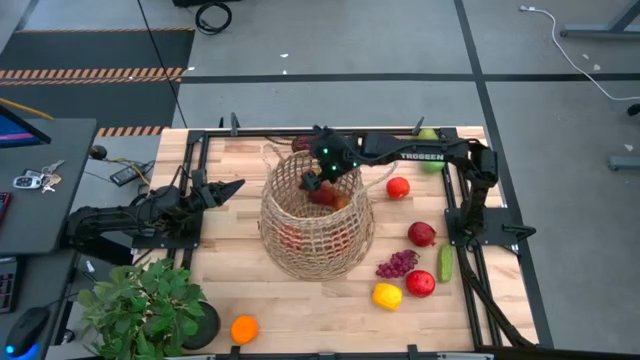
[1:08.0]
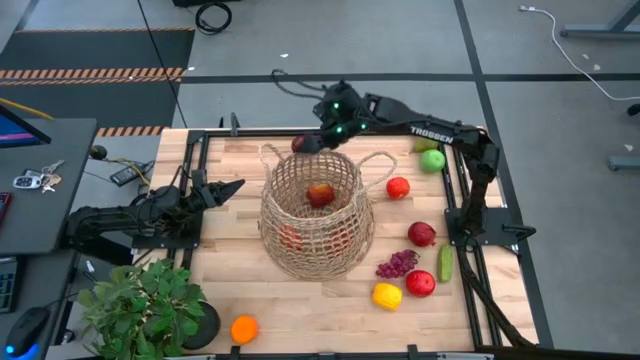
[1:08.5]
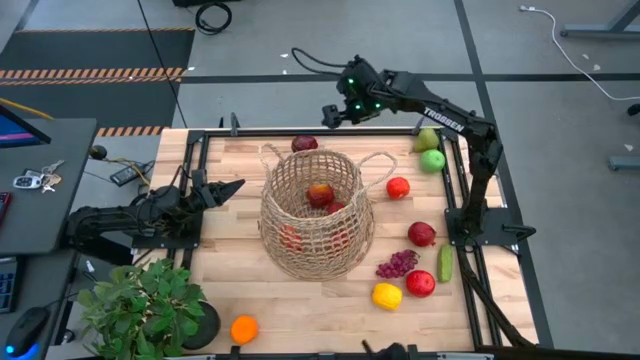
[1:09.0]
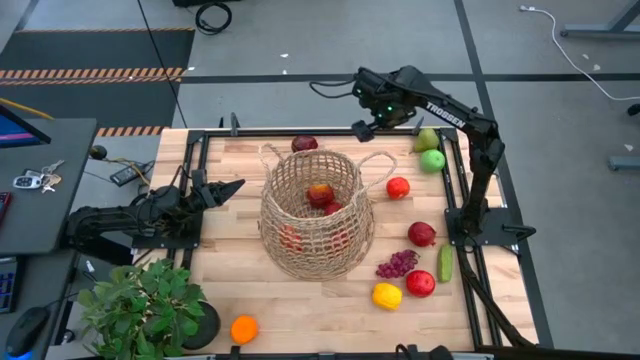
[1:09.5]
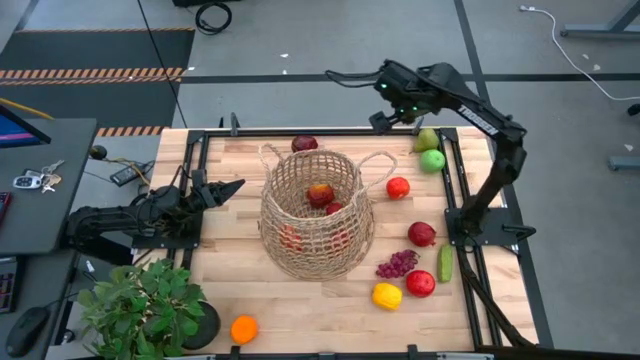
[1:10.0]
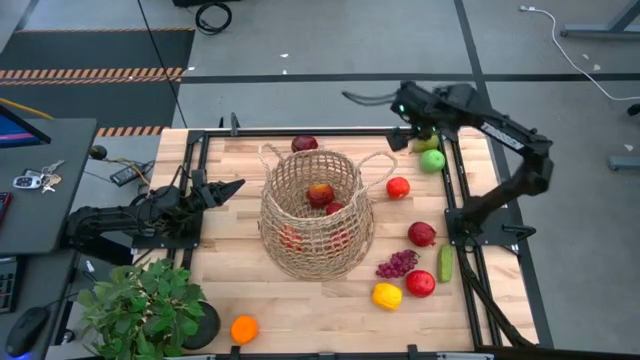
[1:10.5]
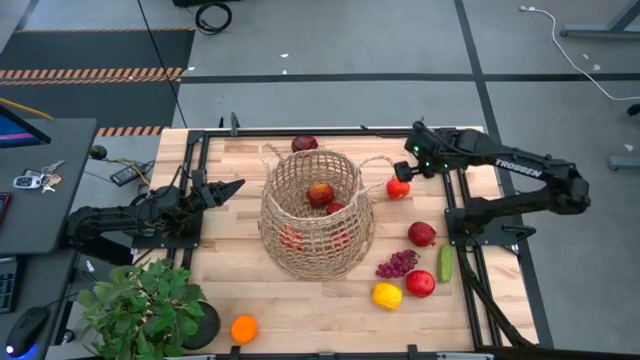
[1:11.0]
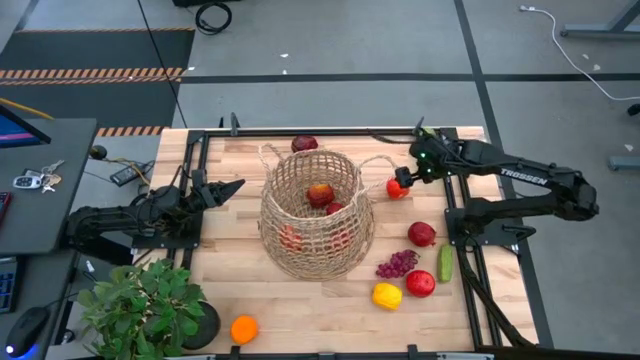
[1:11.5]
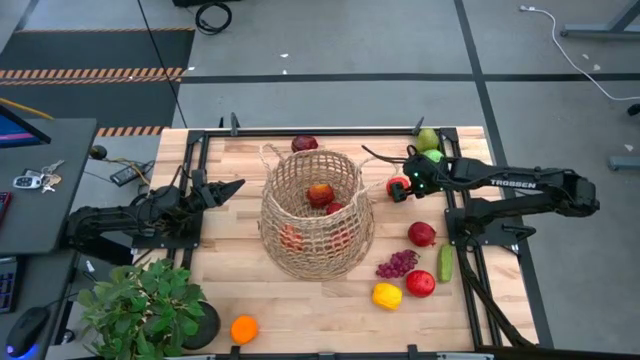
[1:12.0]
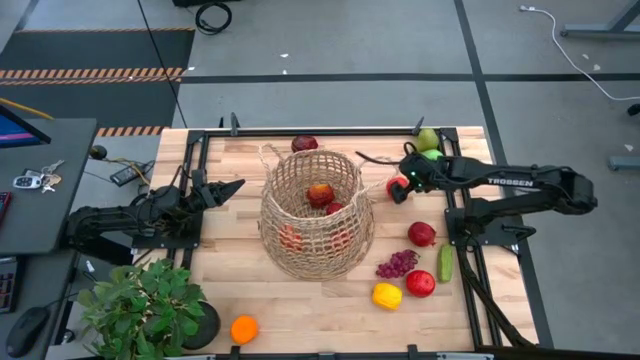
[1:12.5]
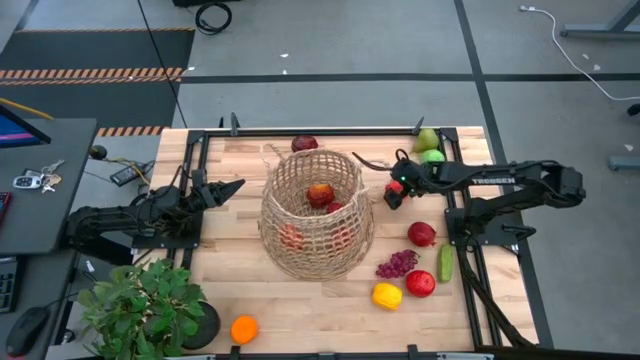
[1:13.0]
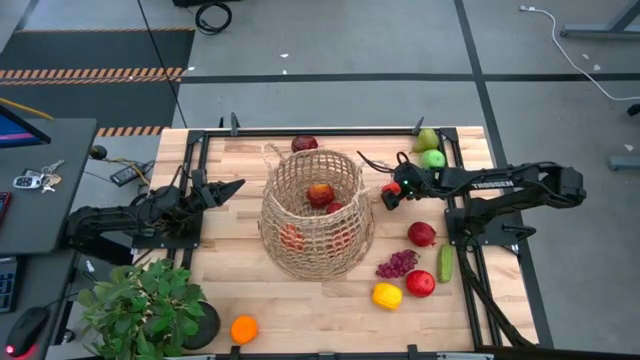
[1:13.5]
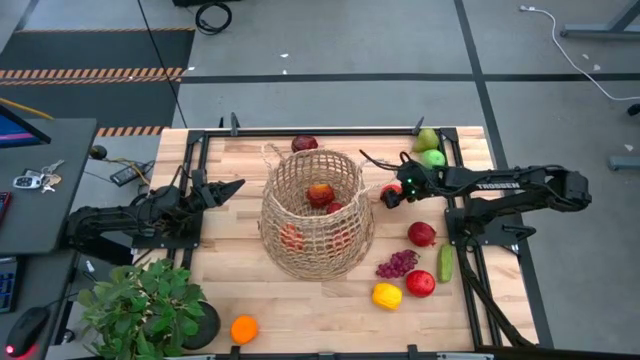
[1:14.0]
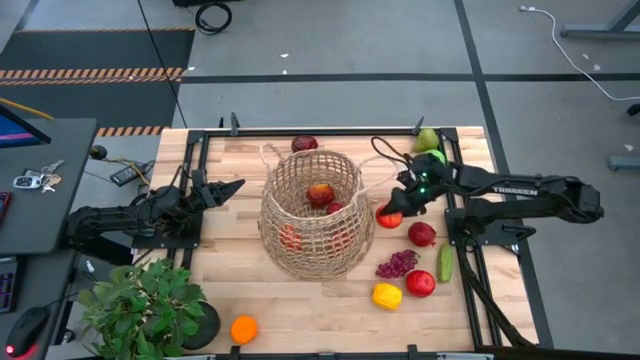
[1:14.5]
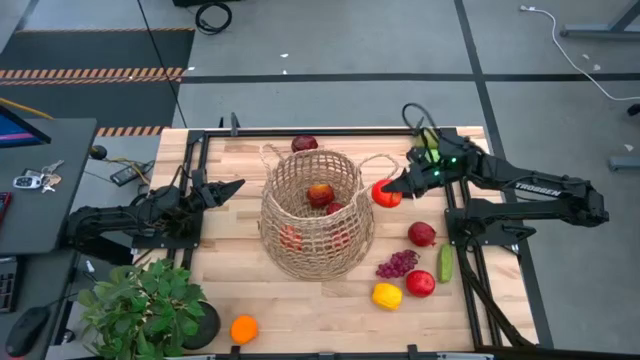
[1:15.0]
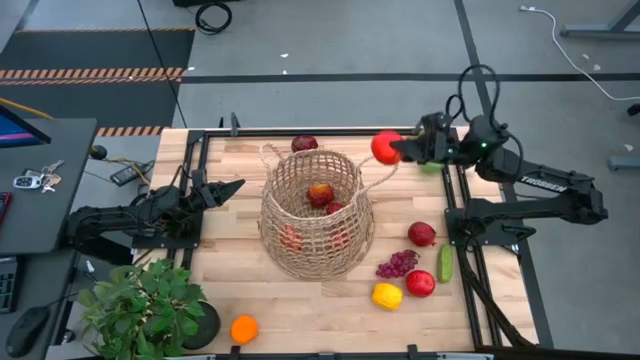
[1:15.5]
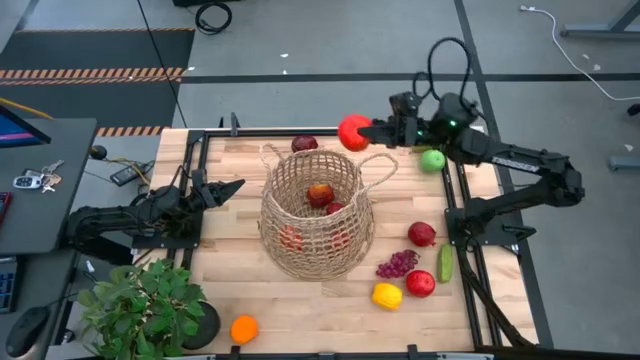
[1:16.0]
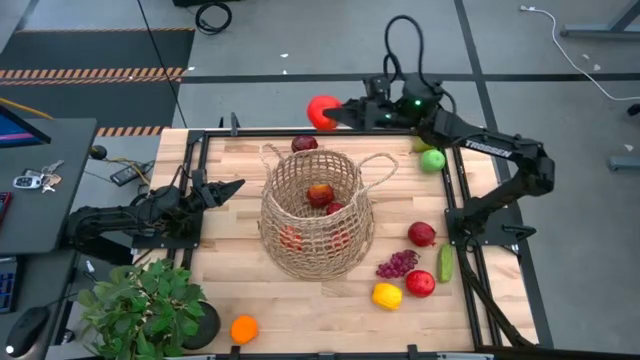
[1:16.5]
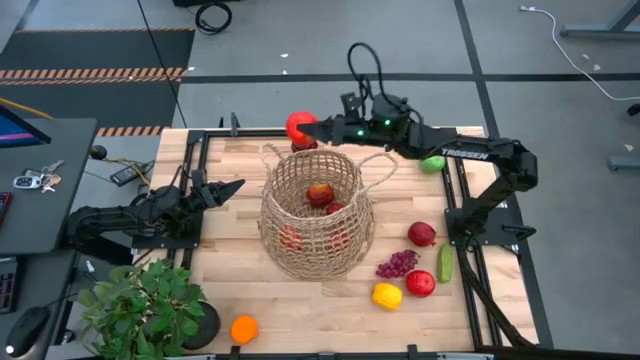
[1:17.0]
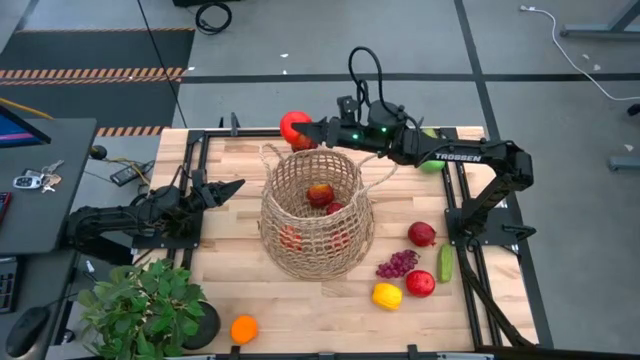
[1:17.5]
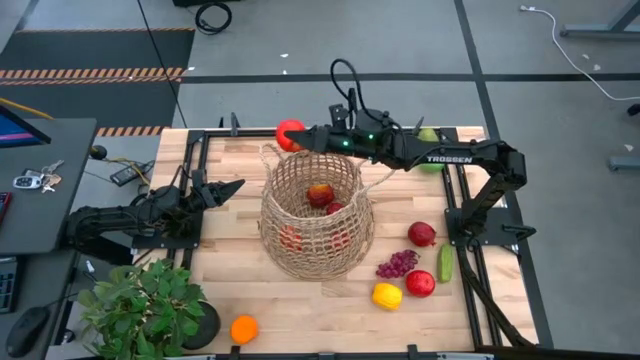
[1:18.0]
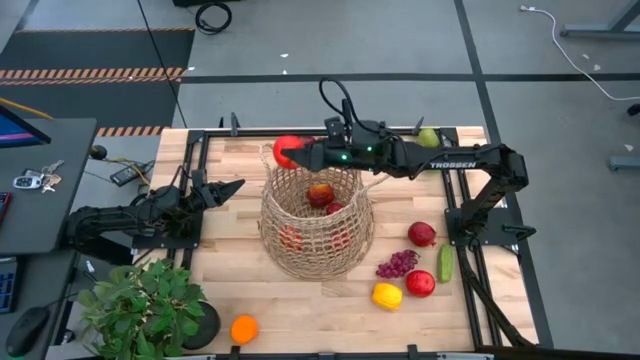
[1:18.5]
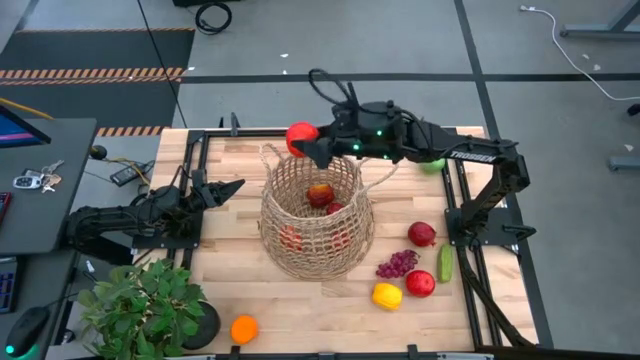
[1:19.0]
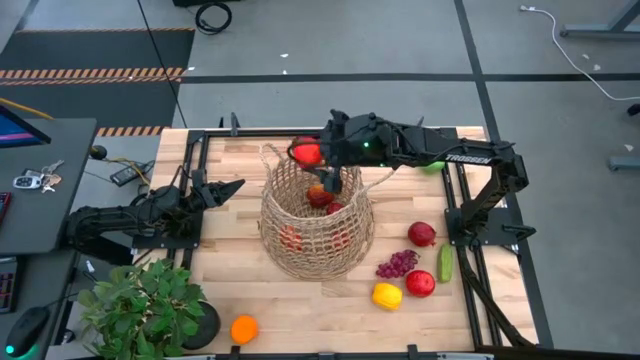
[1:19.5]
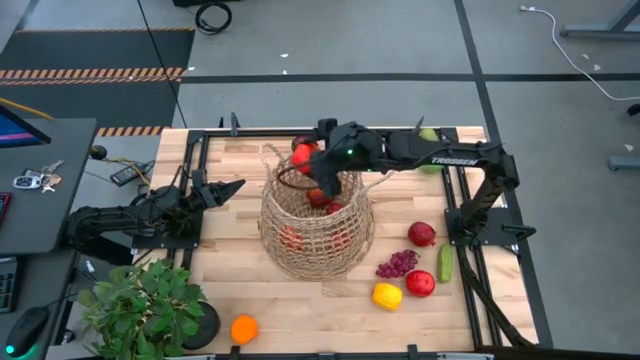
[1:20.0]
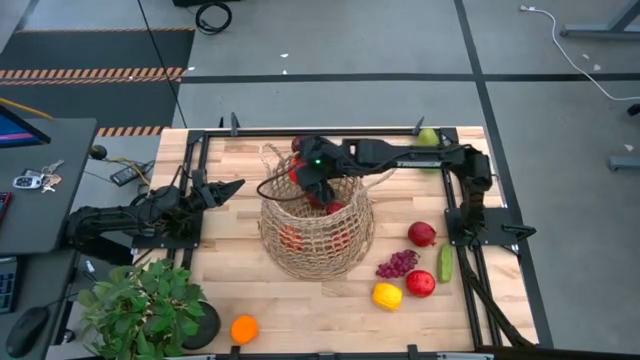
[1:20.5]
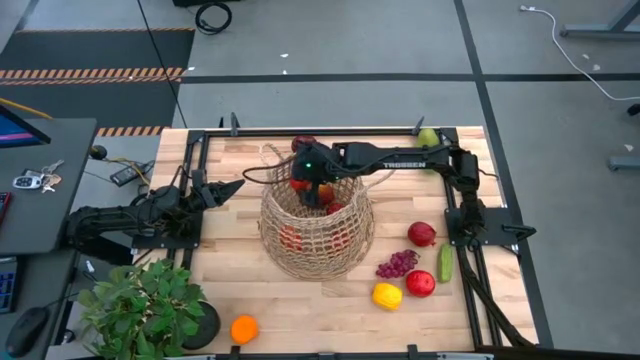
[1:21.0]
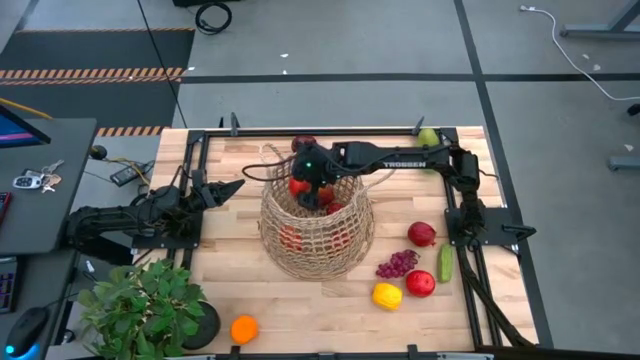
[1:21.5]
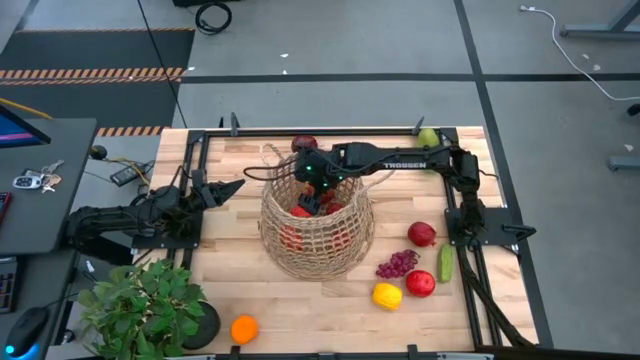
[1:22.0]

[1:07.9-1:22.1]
Task: Build produce basket
Put the red apple into the basket

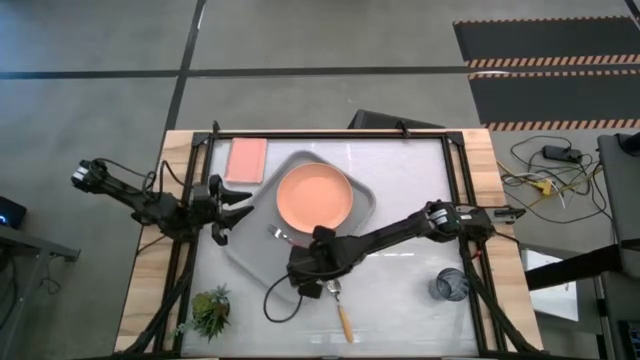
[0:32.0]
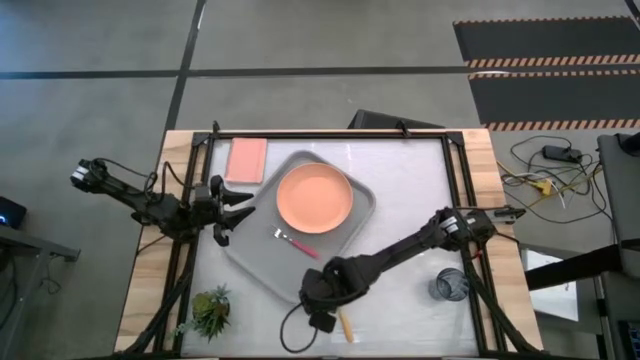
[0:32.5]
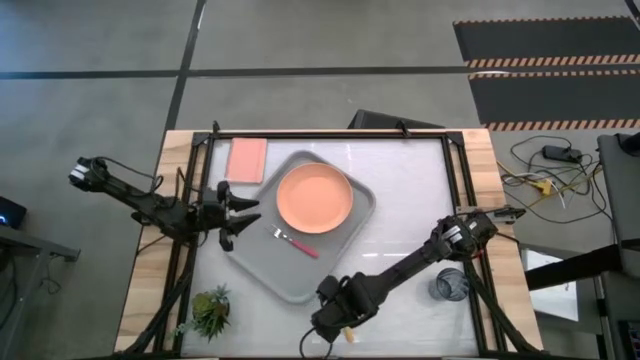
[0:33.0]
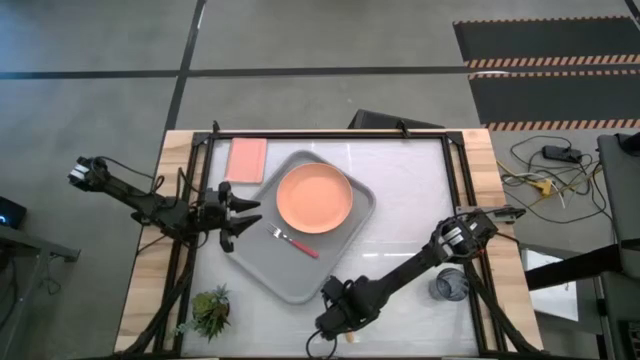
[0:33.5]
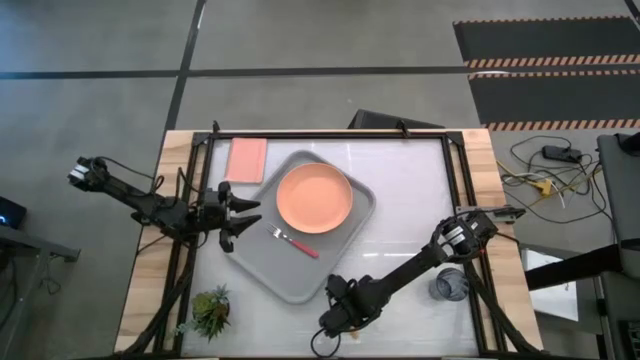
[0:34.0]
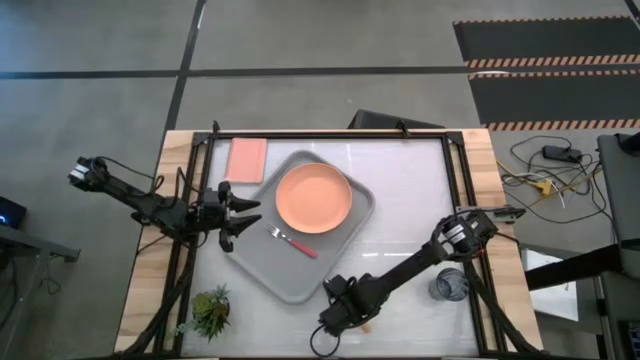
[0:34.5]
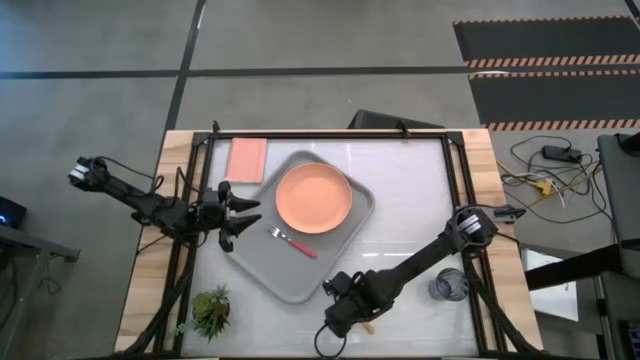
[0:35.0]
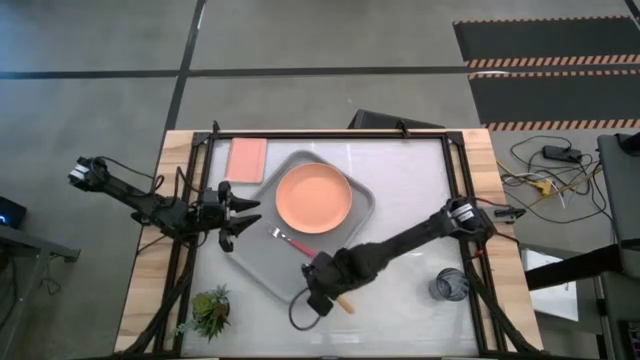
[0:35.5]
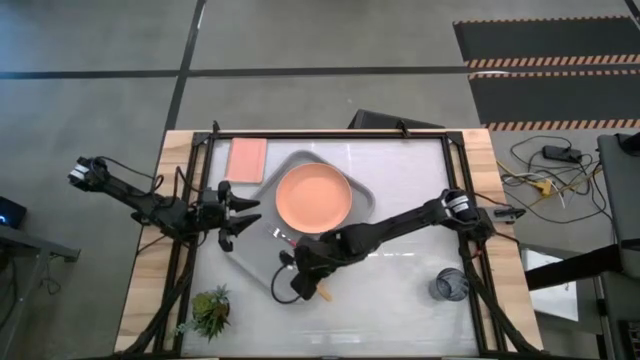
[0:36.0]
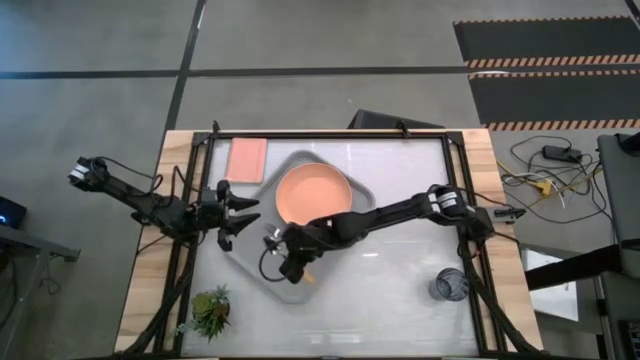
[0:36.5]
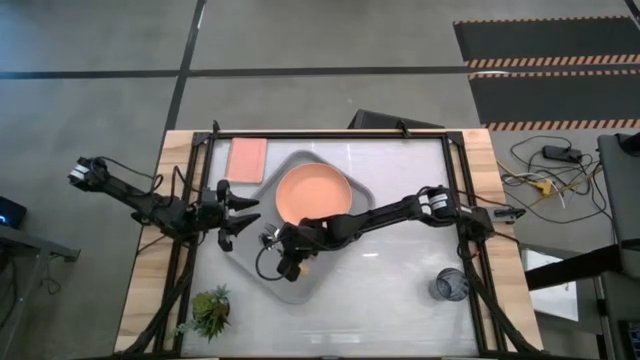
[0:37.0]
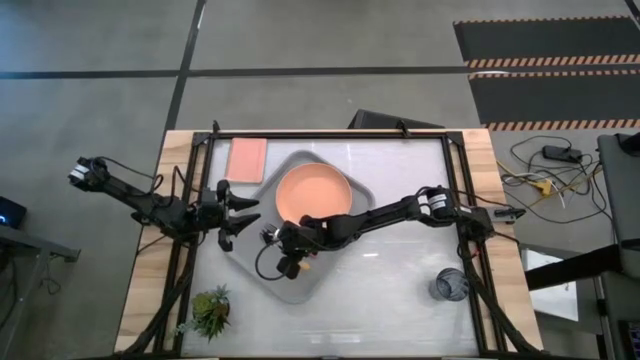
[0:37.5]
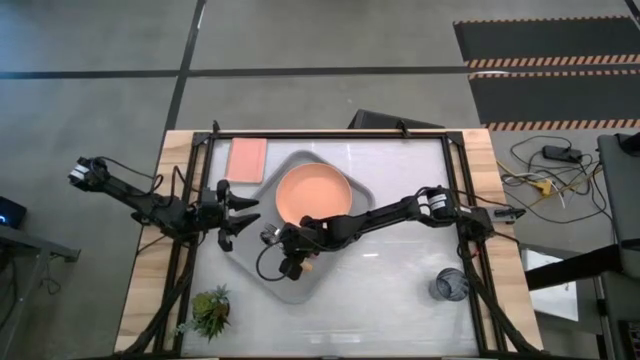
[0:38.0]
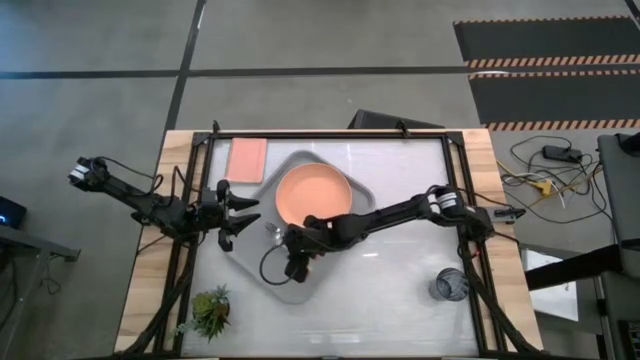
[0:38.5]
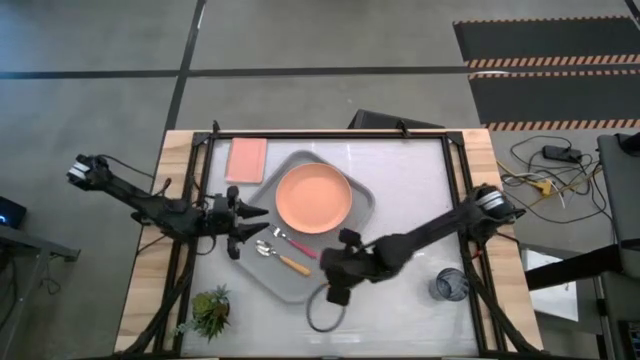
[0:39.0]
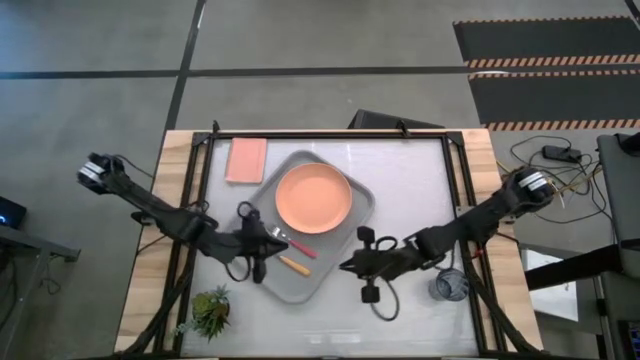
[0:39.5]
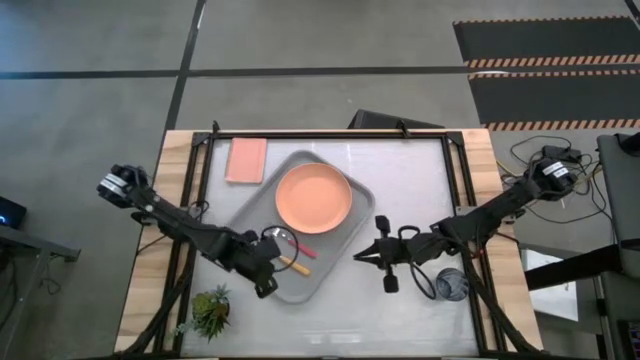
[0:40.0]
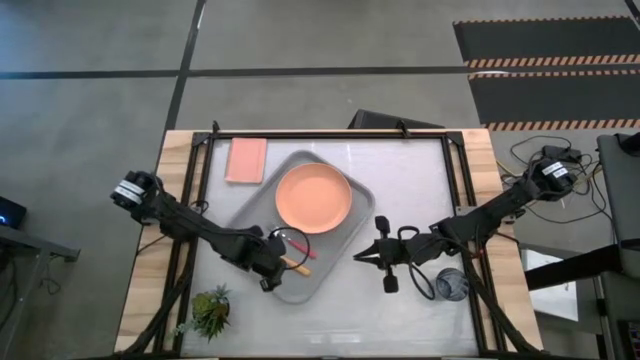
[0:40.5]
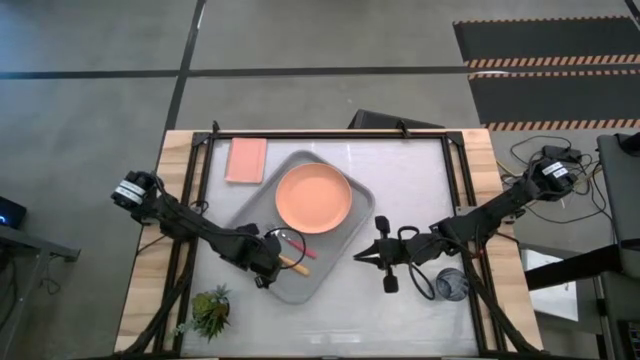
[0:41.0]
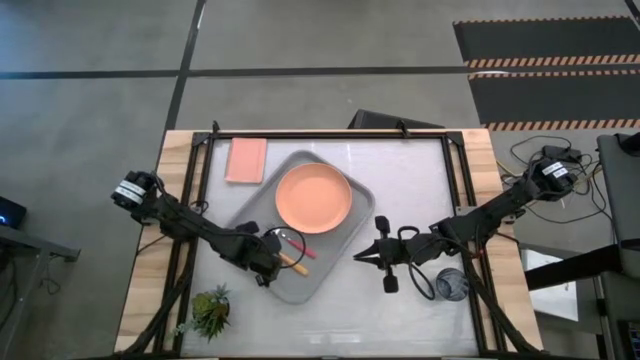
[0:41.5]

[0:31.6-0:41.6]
Task: Pick and place plate/cup/fork/spoon on tray
Put the yellow spoon on the gray serving tray to the left of the pink fork
